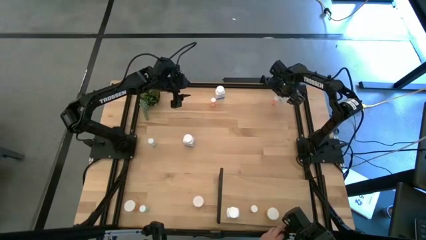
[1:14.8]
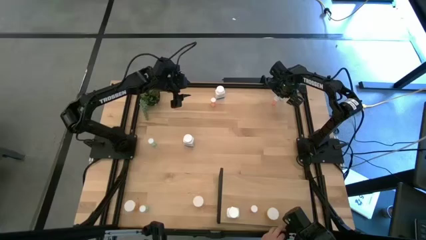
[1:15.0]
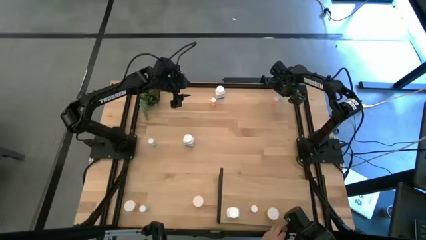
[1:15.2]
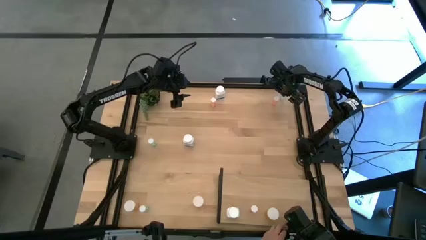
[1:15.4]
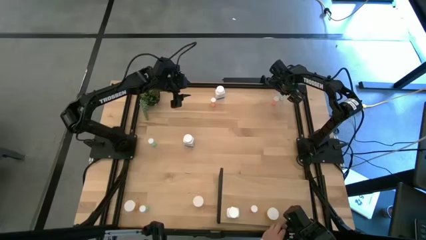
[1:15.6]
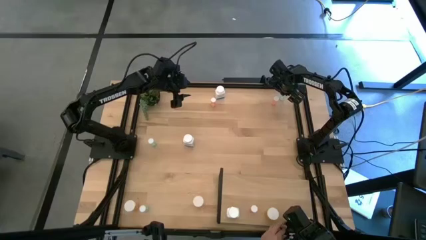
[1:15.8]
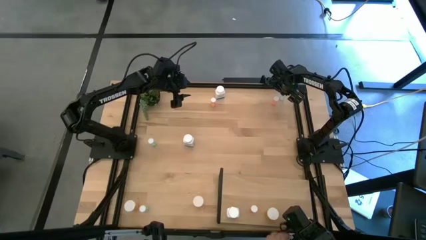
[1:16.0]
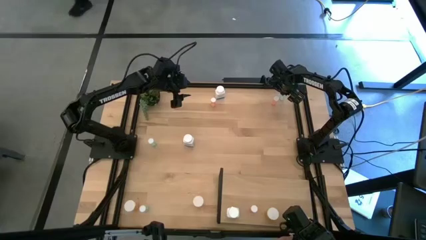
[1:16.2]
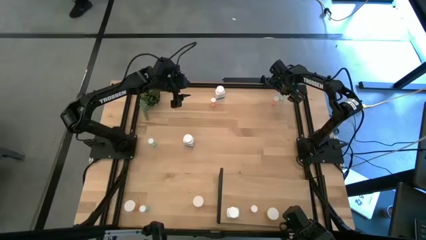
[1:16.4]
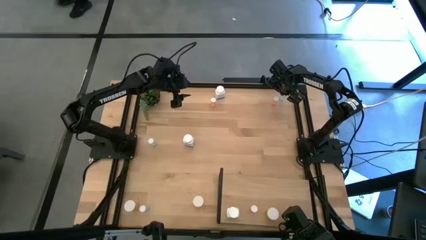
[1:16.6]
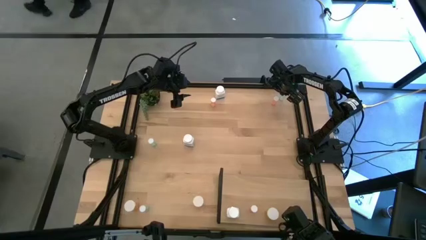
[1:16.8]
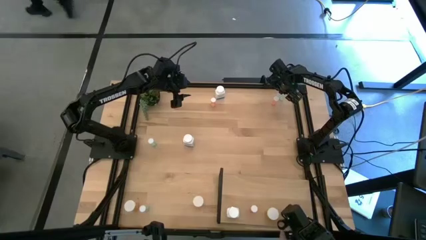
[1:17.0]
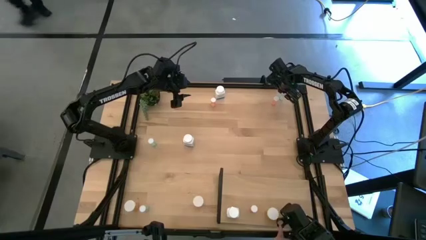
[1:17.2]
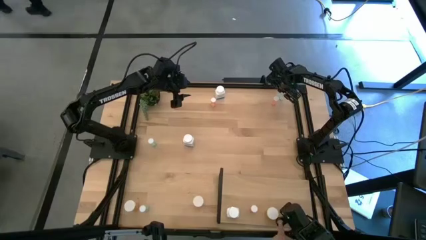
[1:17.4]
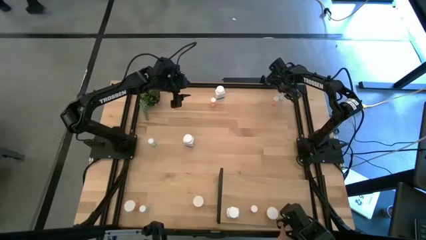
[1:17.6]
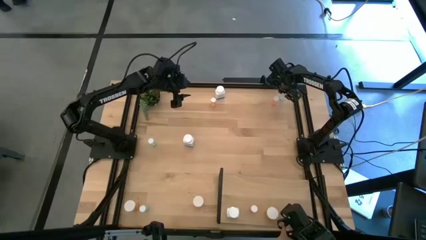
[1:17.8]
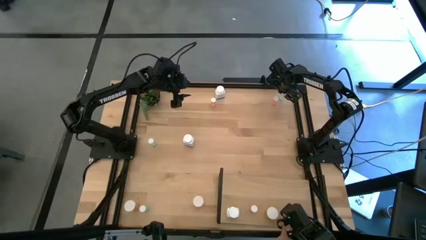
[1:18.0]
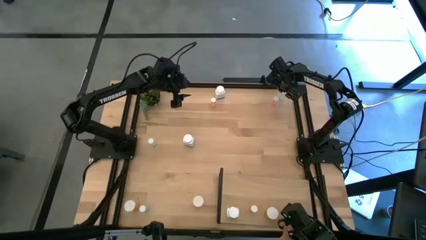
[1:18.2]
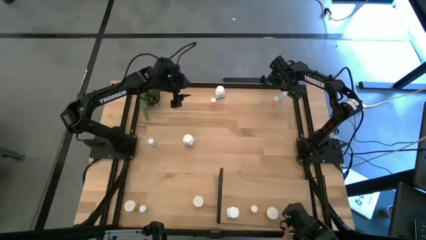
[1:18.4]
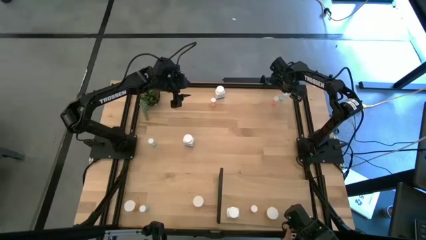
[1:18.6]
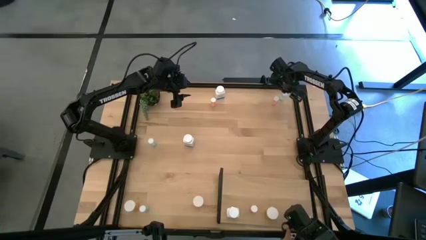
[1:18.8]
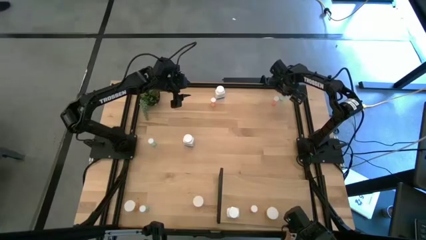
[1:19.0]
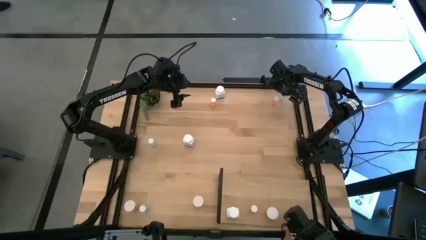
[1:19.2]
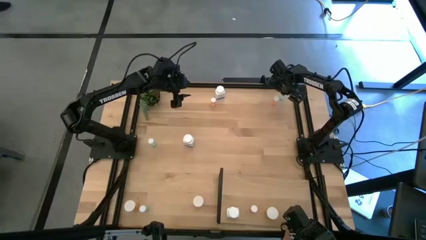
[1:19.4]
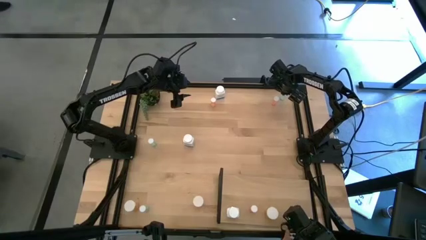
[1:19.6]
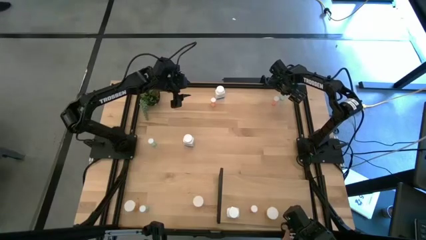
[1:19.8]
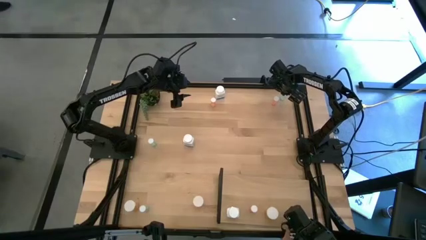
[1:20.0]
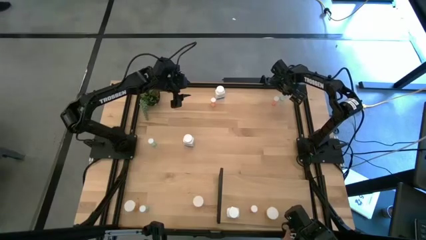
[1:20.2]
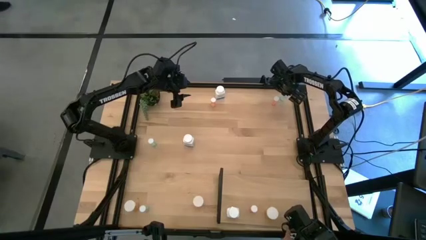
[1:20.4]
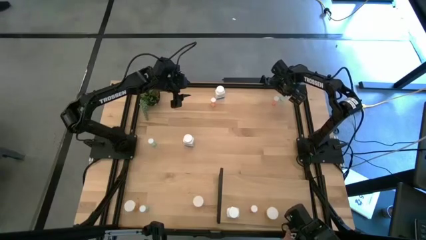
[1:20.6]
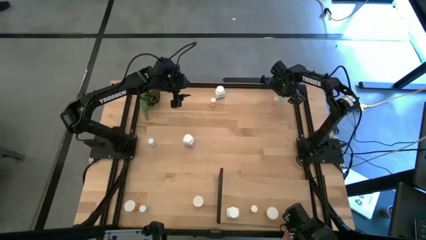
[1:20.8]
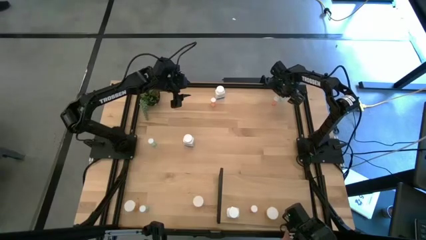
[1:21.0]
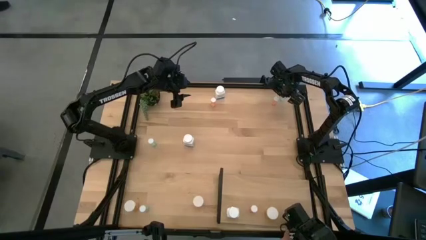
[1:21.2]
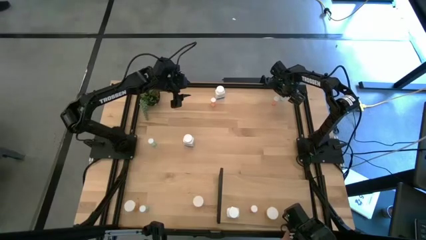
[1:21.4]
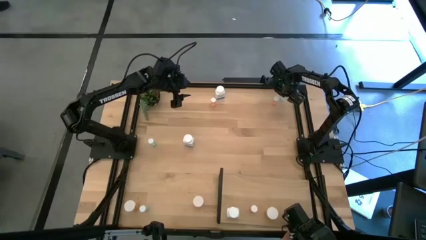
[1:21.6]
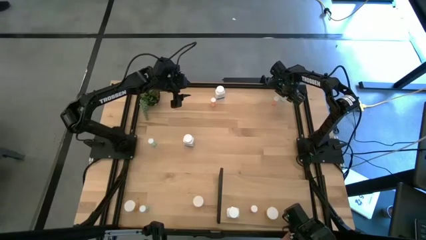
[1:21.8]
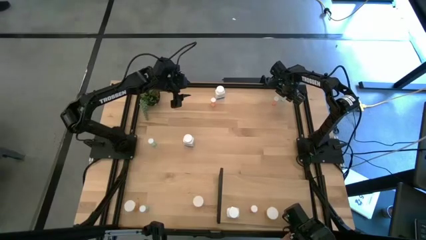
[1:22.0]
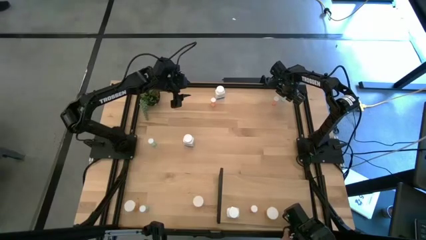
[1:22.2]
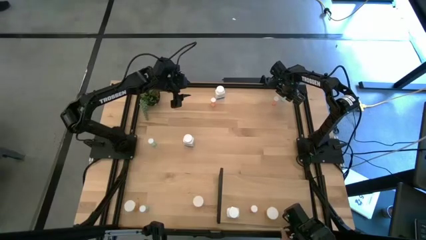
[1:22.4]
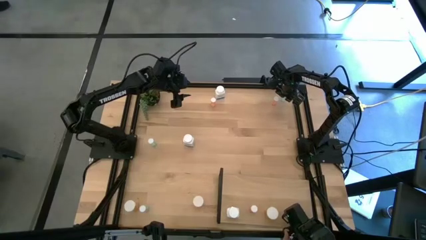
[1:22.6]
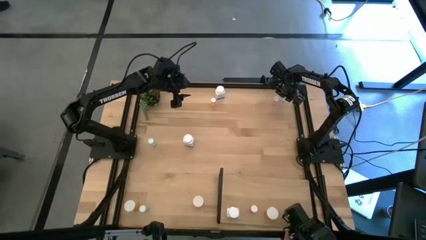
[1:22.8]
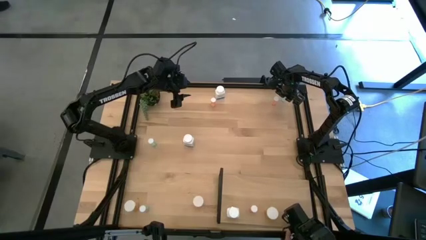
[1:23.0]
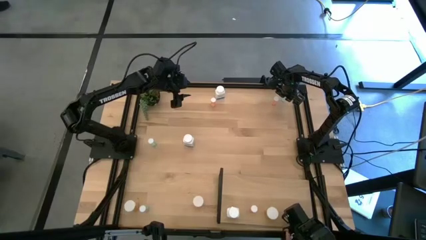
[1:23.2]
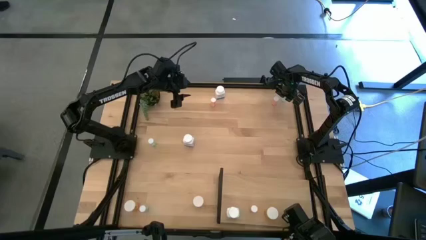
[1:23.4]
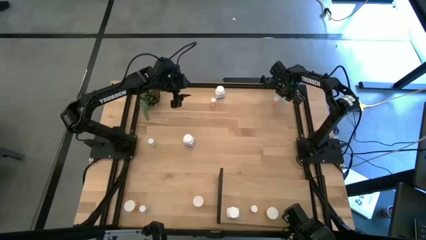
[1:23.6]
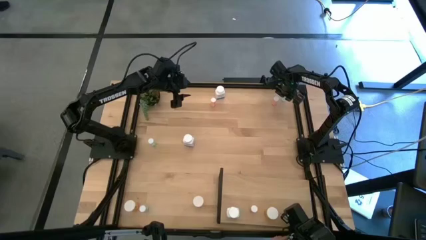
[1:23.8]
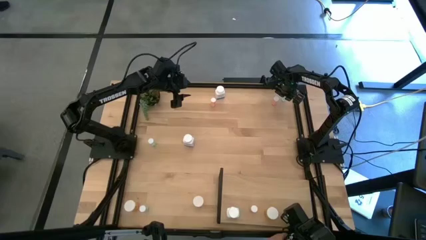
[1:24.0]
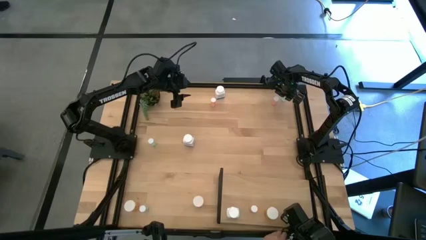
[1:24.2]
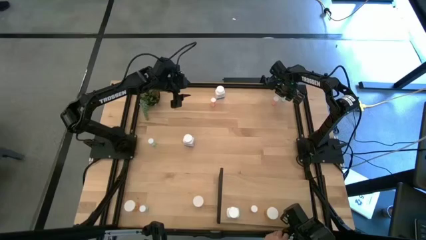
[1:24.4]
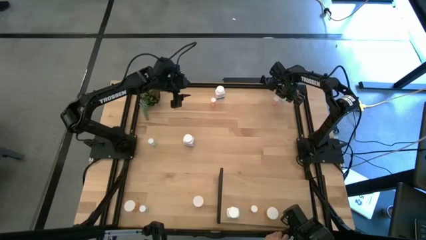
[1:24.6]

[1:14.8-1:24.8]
Task: Pick and place medicine bottles onto shelf by color
Put the top right blue pill bottle on the shelf
